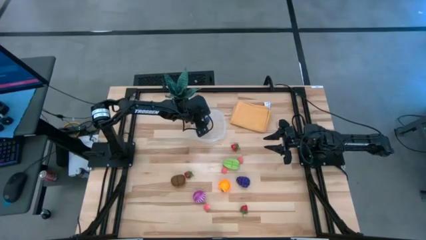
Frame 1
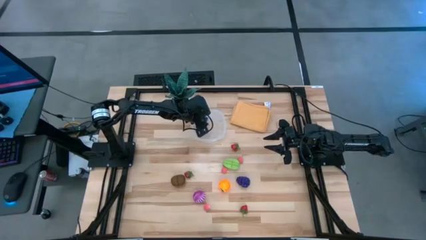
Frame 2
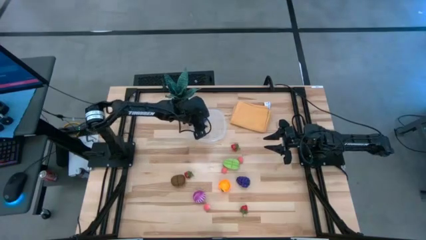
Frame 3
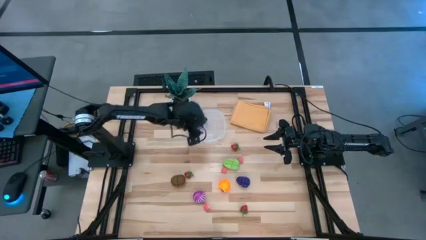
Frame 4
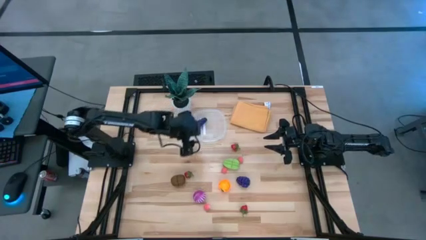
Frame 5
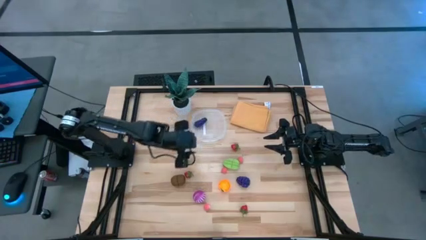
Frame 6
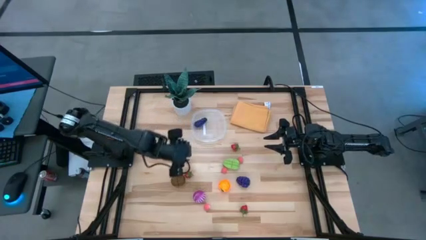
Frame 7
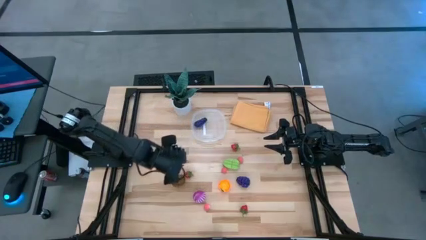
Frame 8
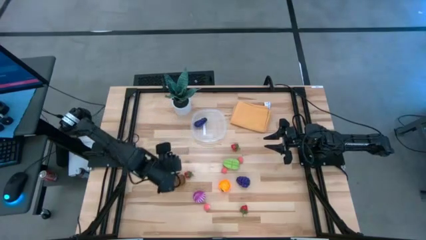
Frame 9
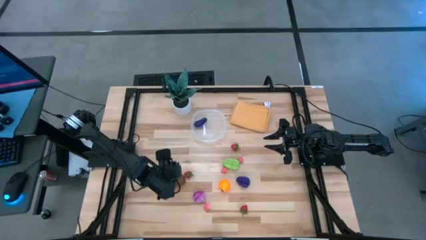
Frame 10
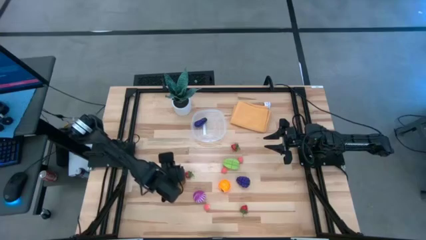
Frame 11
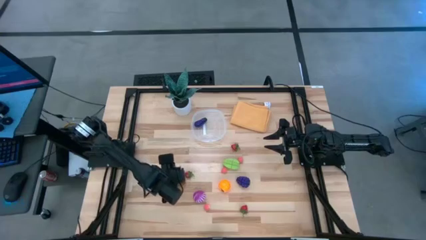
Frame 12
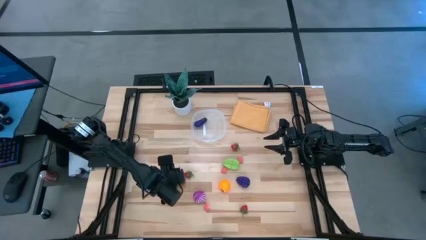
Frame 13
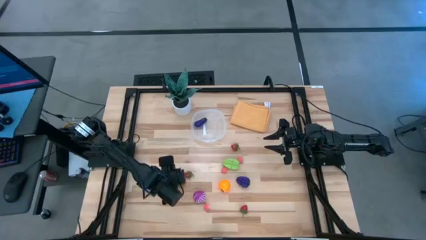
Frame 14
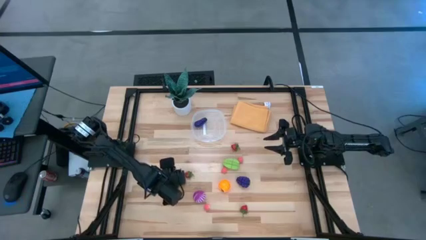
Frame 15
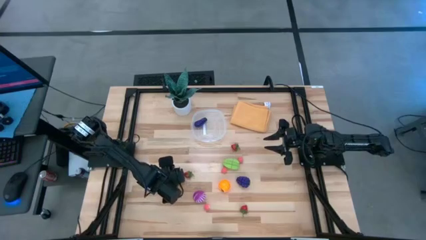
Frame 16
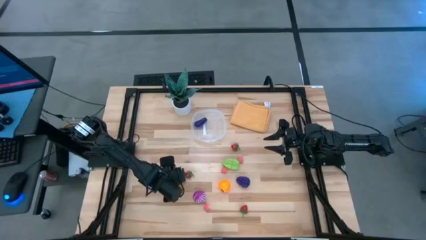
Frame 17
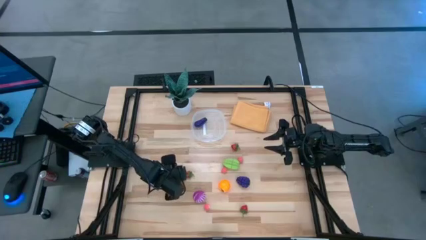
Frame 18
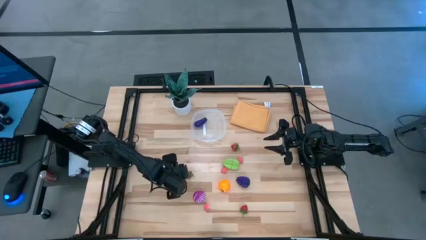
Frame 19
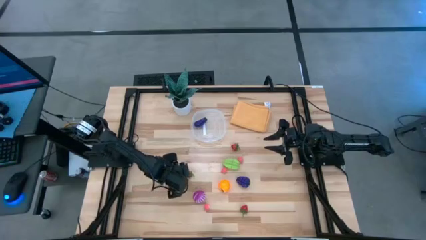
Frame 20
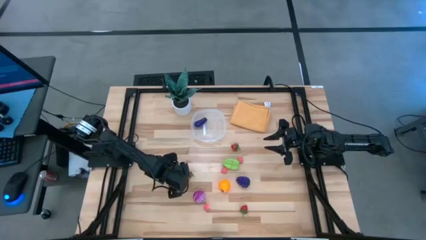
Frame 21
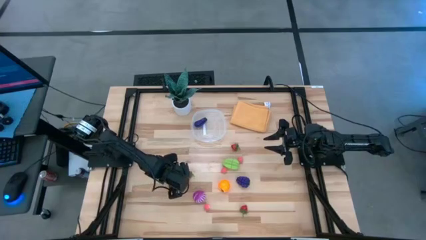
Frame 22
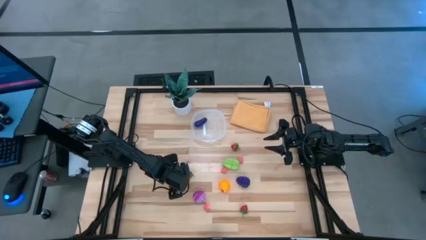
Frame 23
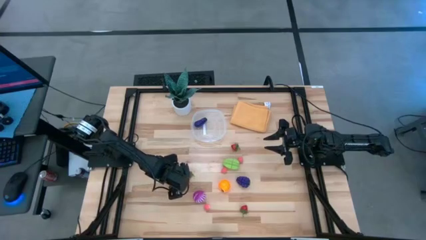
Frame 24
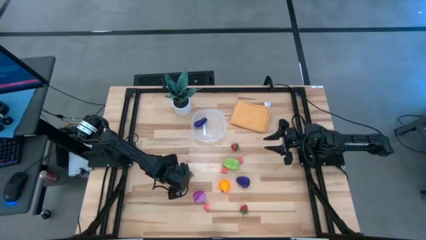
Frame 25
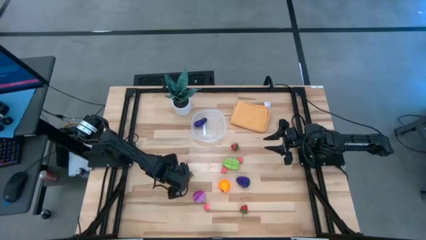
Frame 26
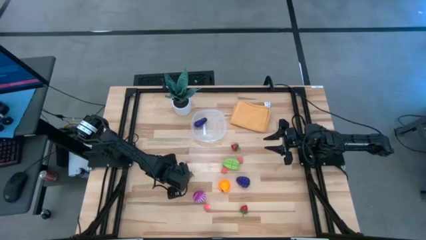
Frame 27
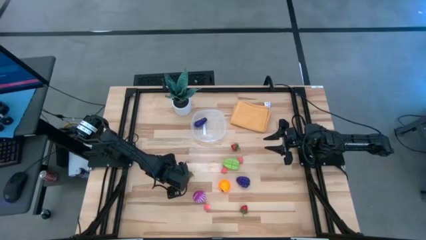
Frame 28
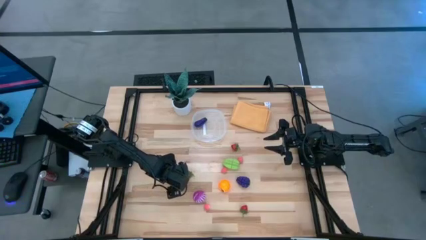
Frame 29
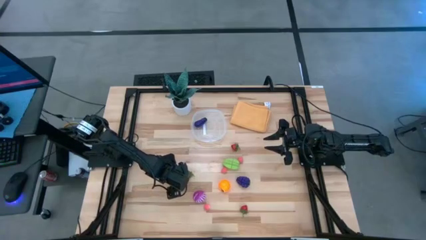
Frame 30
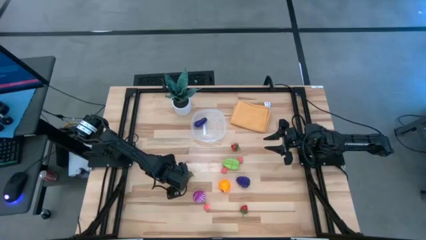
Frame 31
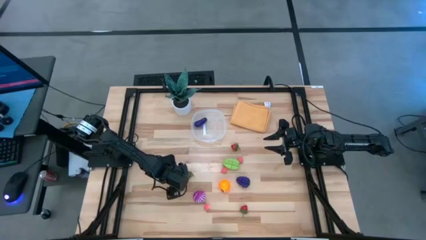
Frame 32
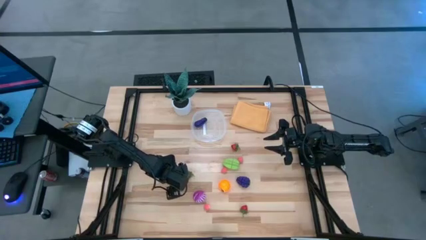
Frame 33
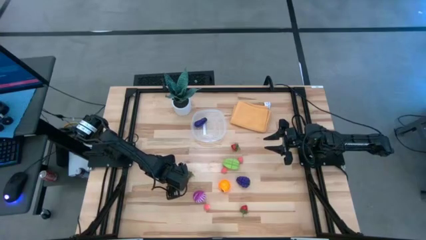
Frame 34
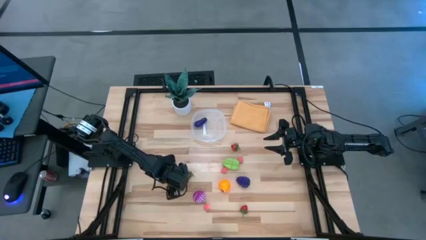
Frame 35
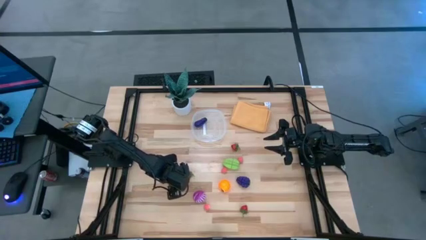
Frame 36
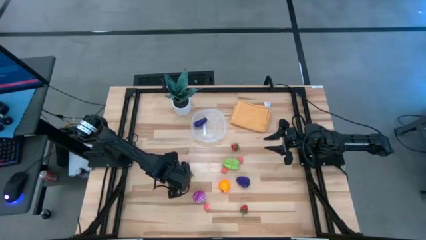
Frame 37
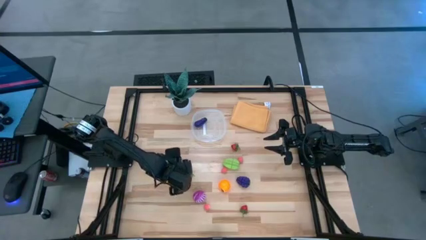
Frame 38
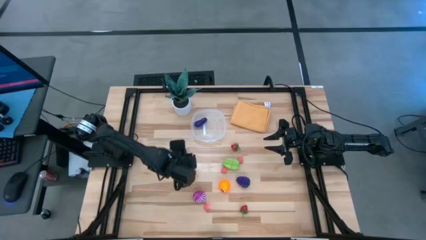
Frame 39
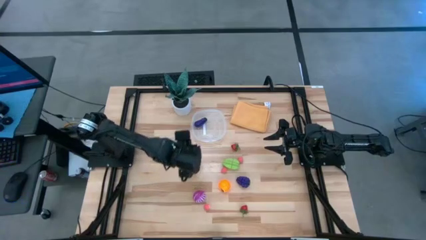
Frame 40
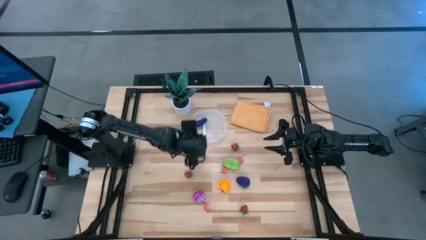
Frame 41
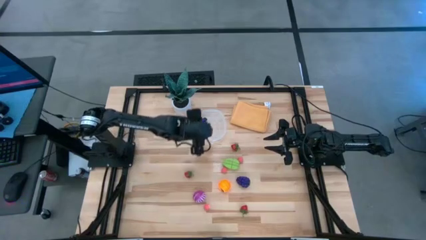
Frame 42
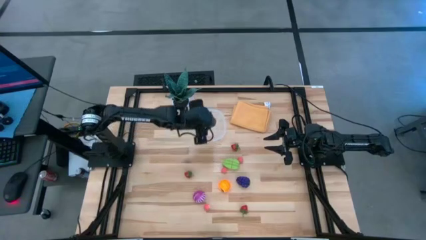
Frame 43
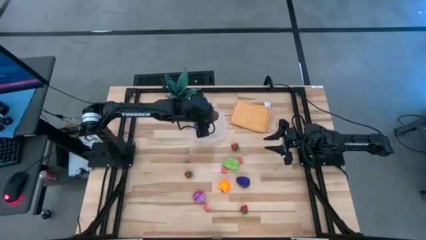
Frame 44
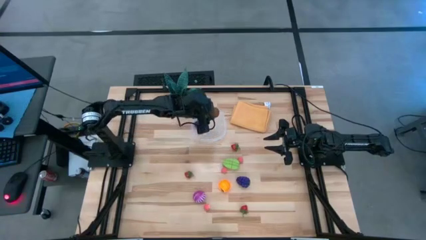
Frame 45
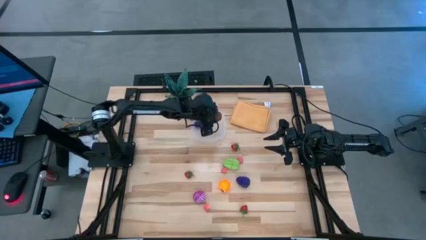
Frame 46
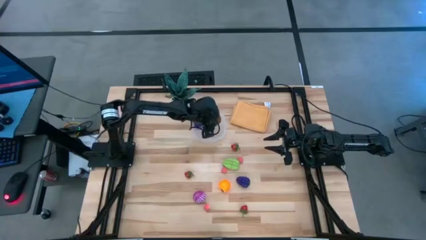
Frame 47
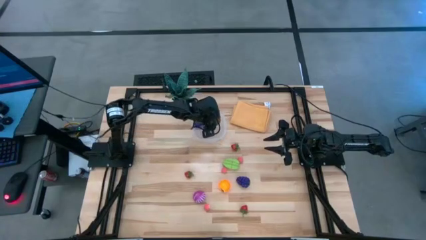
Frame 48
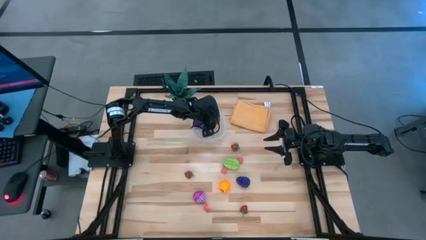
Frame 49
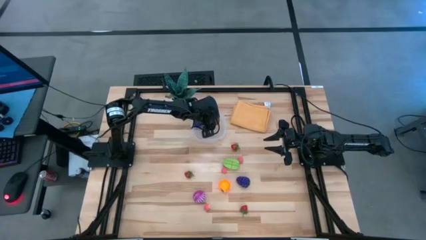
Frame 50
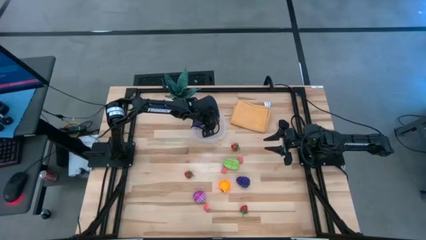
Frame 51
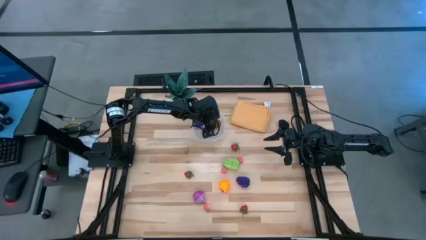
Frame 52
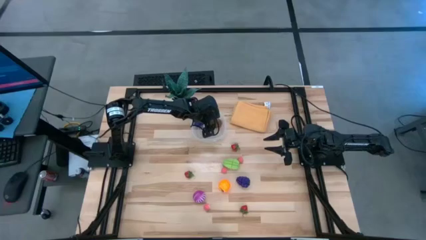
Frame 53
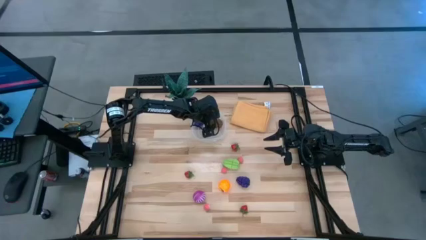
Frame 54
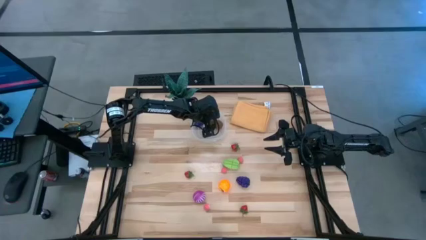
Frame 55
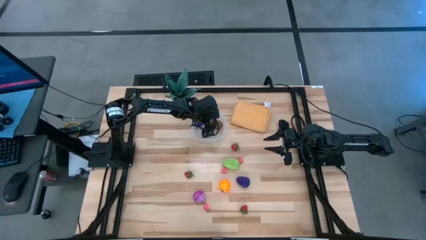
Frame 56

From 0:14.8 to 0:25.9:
Task: Pick and placing Produce into tupperware
Put the brown kiwi into the transparent bin
